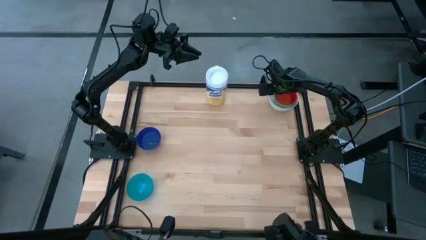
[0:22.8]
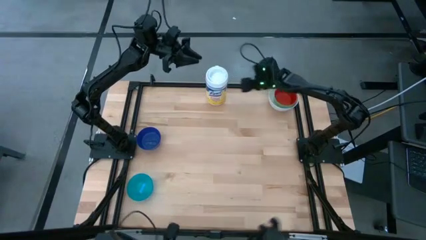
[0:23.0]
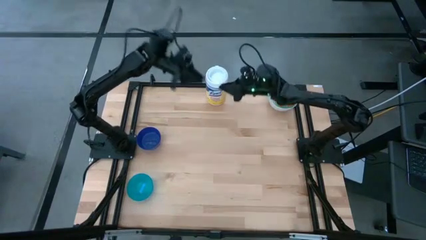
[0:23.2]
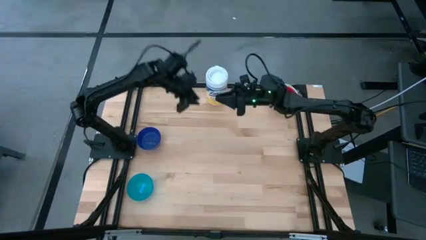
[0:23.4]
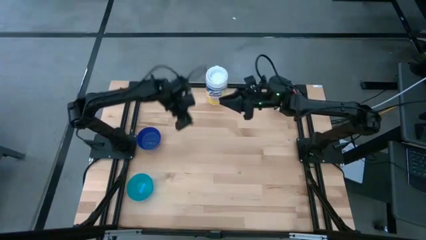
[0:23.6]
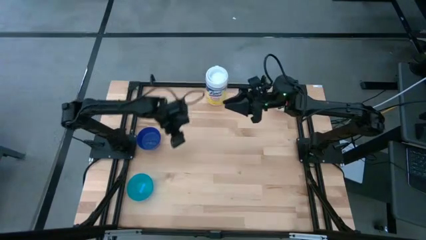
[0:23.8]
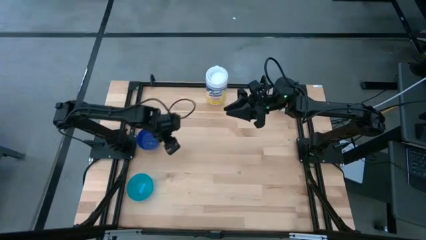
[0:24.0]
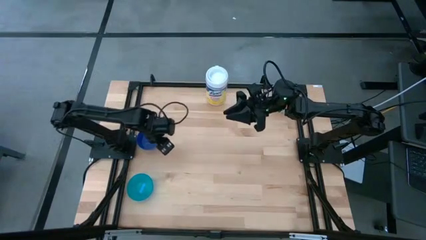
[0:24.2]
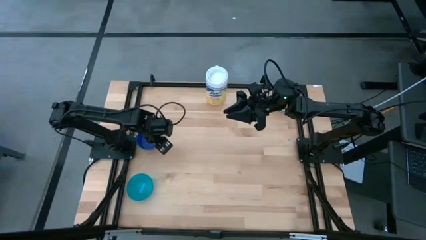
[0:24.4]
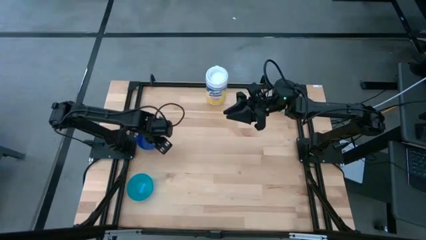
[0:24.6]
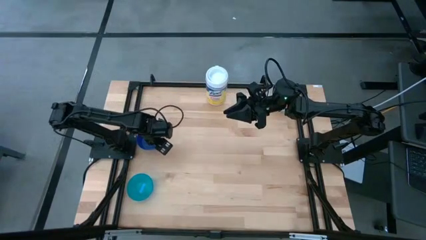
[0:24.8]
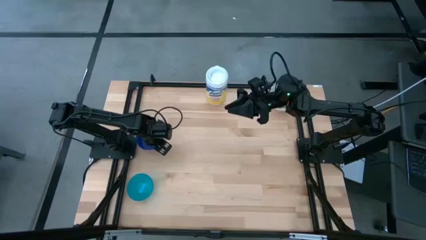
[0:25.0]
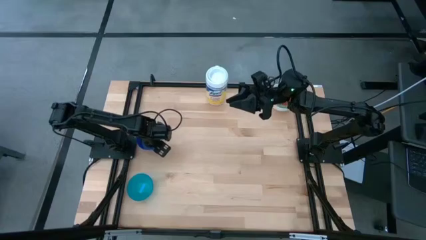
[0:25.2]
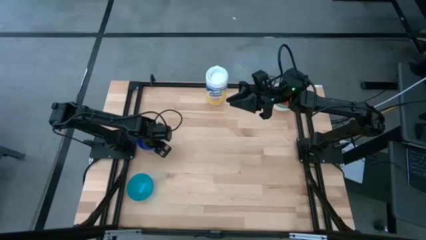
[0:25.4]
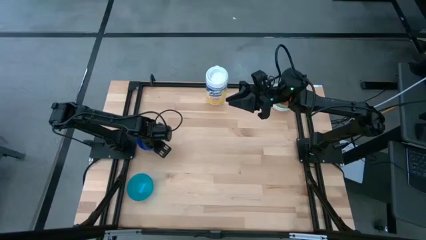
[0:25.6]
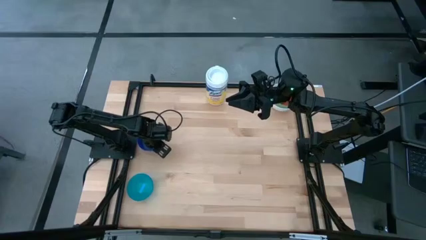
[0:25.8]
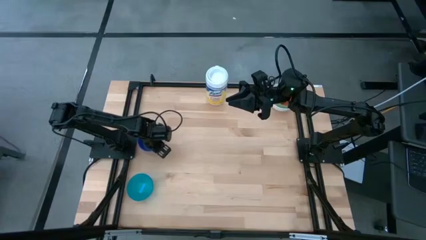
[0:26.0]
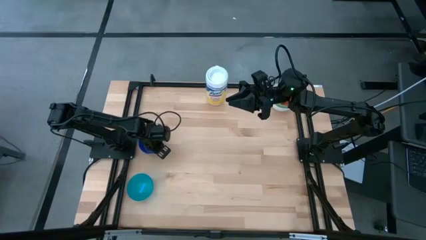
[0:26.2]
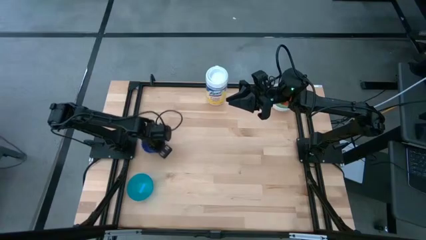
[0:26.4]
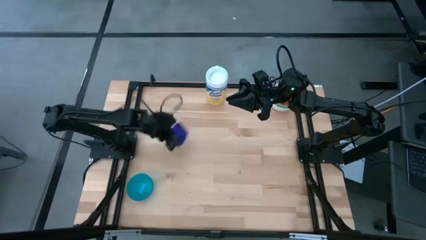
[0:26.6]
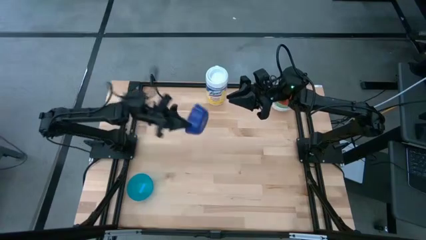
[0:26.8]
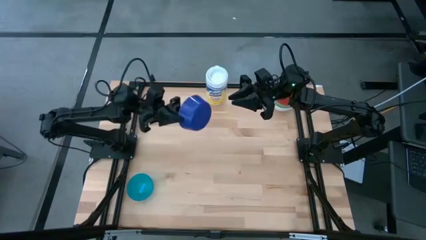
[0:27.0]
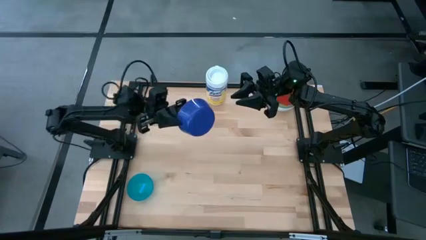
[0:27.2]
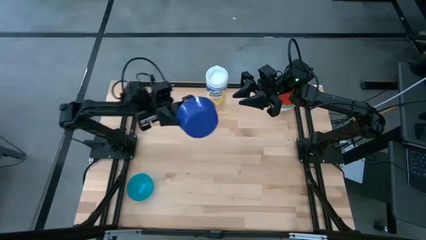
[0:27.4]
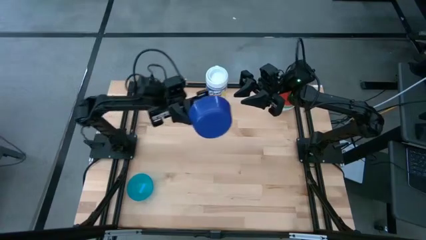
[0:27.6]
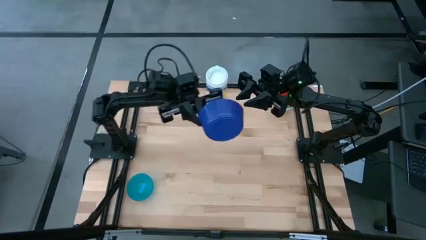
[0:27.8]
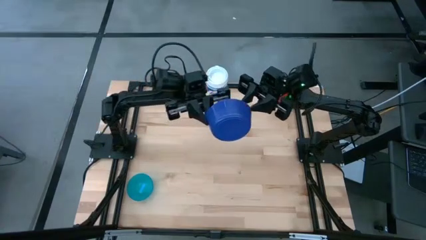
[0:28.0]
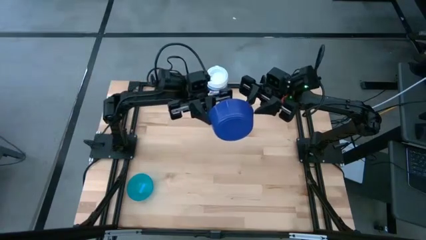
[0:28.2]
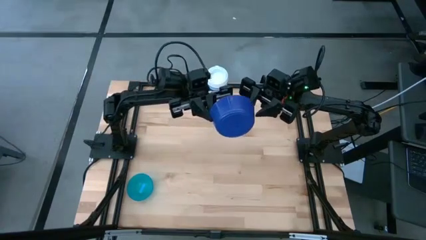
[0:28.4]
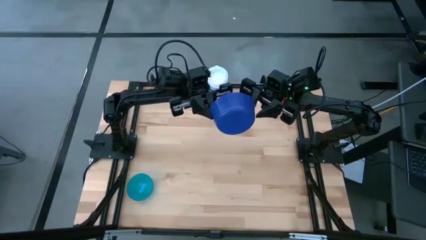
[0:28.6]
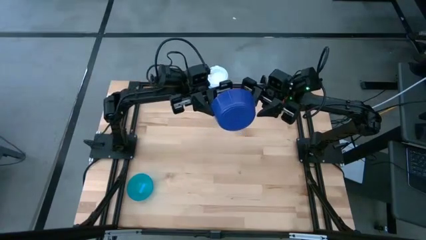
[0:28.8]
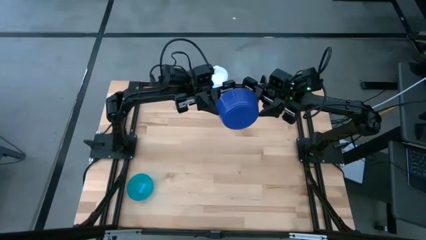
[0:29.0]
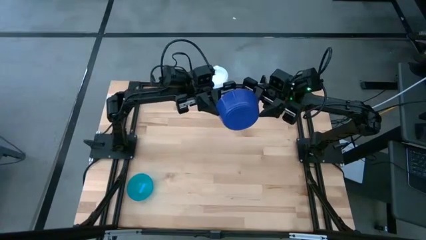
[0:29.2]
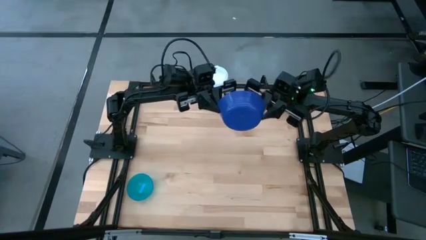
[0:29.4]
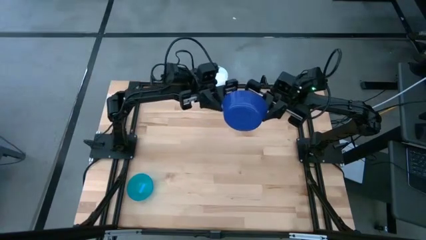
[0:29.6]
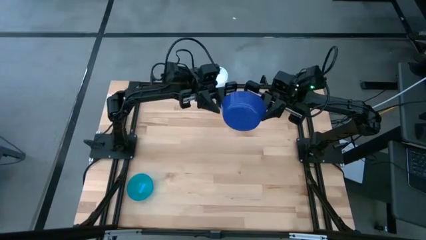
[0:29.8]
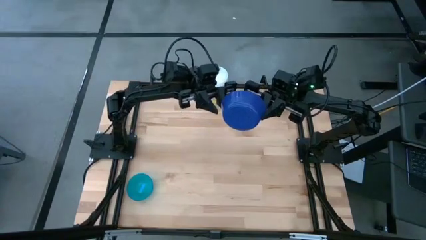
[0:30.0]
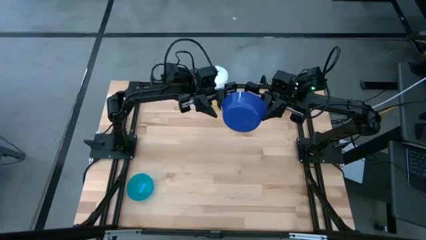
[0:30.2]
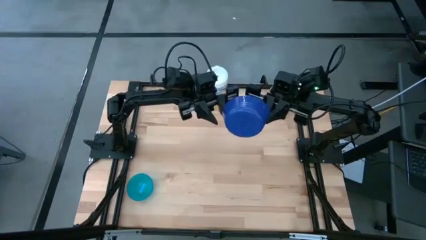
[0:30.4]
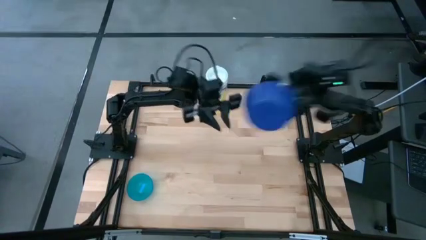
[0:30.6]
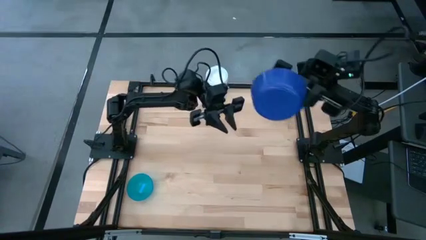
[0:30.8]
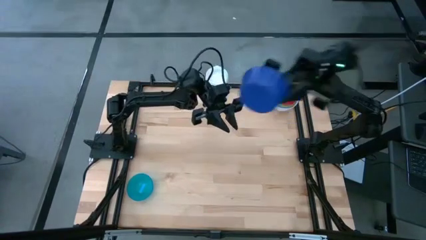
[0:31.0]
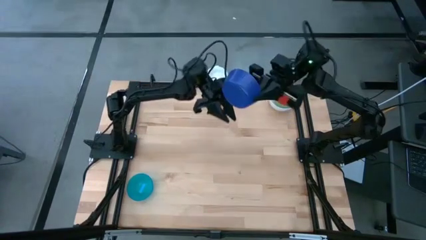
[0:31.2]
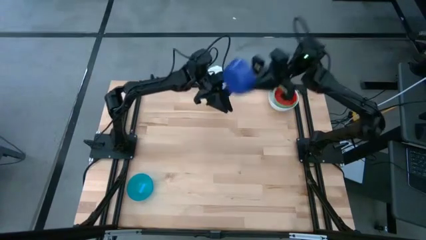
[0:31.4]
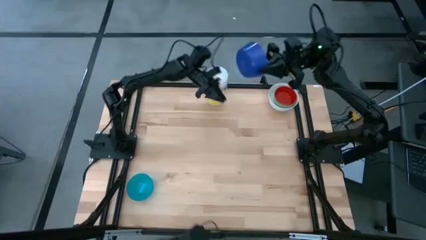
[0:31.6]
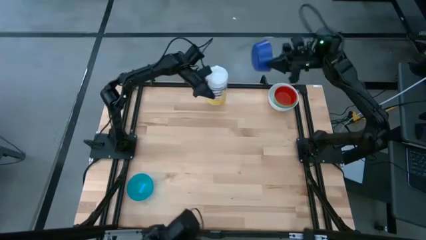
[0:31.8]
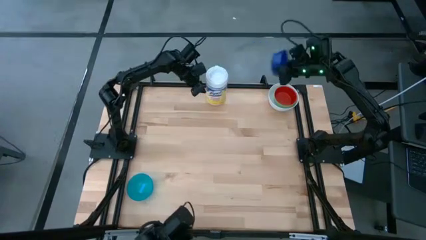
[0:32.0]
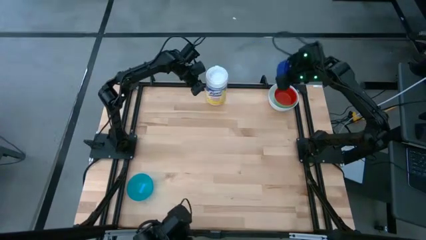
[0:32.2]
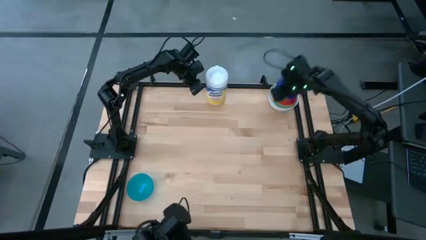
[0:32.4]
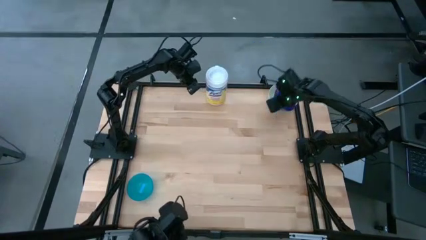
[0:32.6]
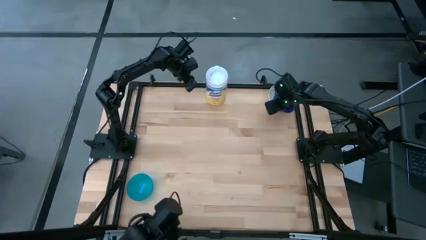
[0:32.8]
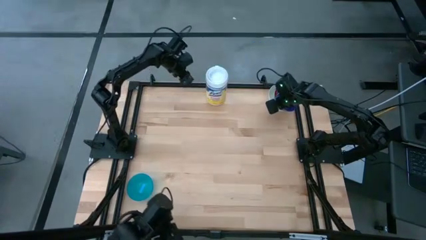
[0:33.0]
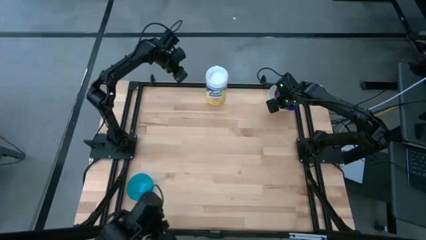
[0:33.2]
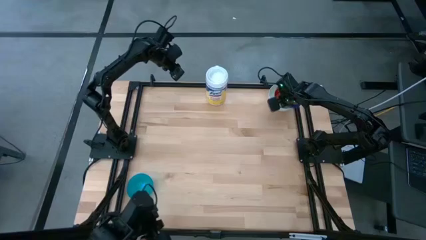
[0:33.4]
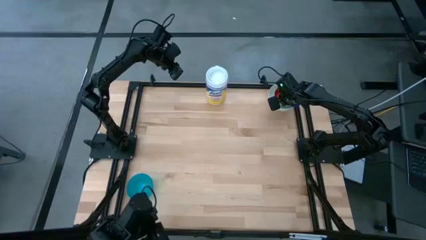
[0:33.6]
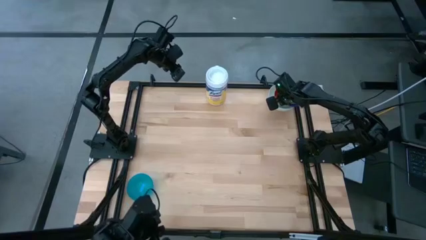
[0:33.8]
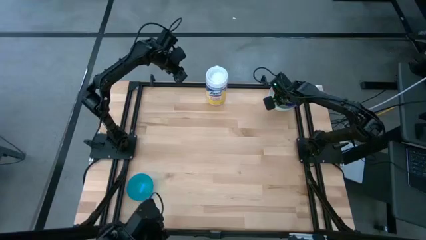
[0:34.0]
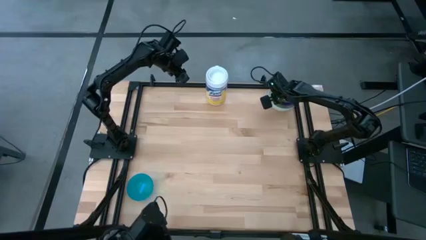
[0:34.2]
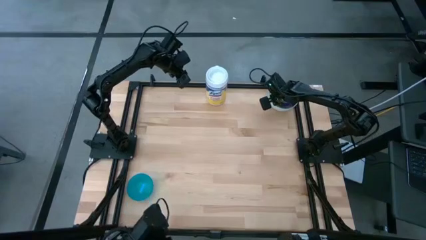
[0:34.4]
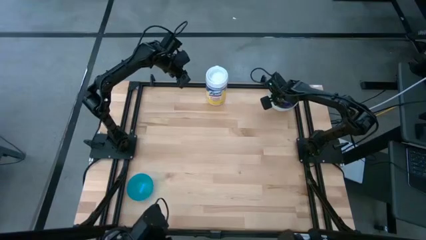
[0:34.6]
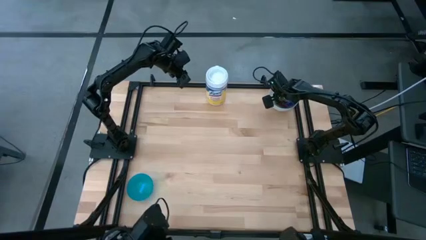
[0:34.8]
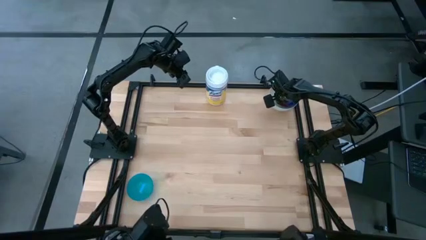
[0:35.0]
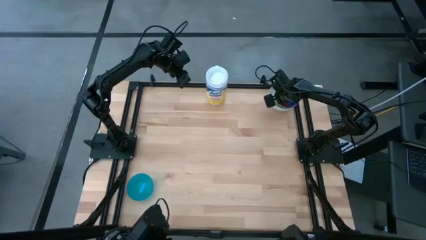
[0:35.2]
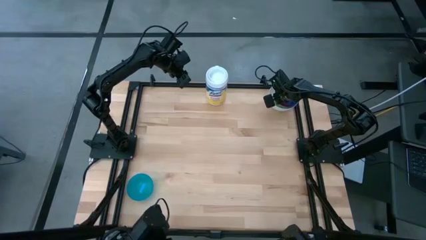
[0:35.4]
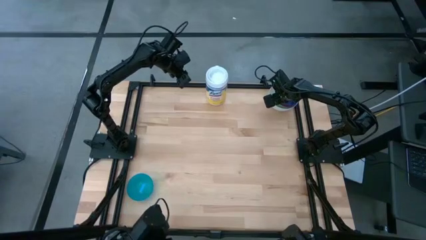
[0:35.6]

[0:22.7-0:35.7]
Stack the dark blue bowl on top of the red bowl
